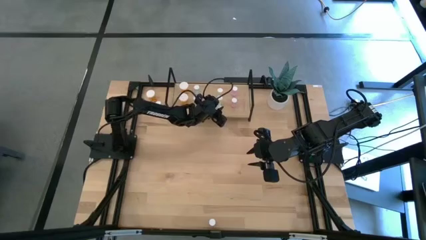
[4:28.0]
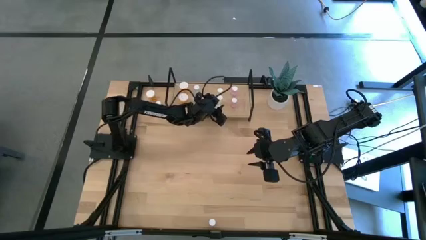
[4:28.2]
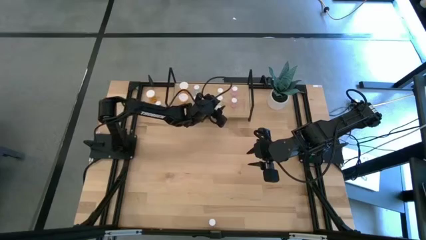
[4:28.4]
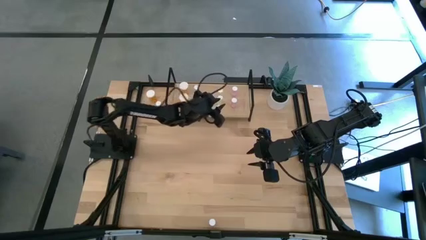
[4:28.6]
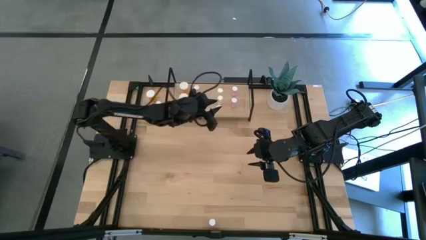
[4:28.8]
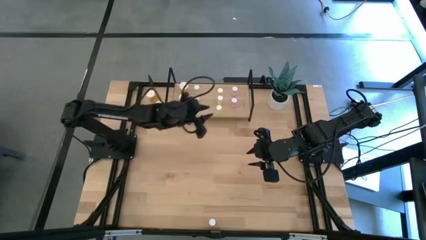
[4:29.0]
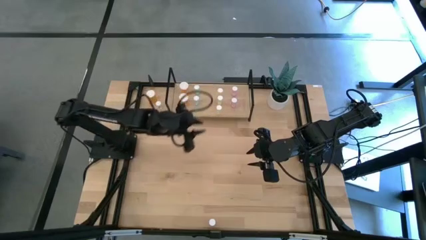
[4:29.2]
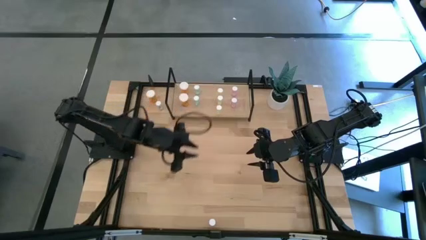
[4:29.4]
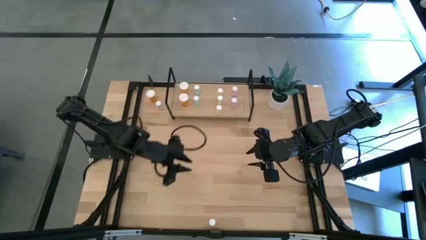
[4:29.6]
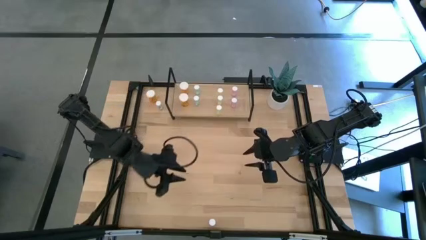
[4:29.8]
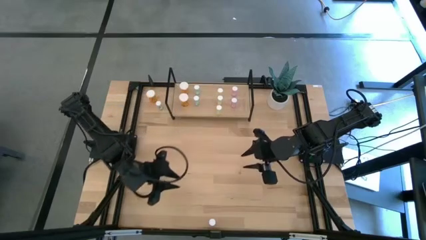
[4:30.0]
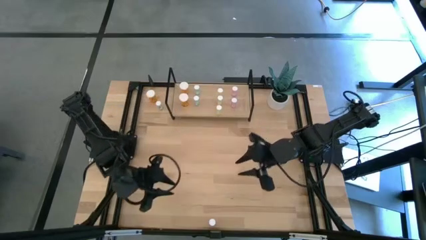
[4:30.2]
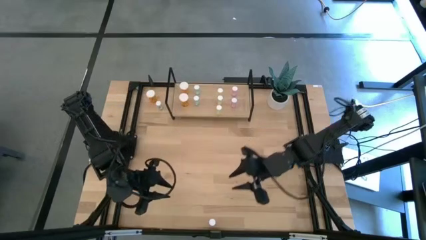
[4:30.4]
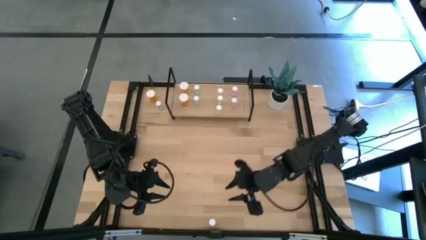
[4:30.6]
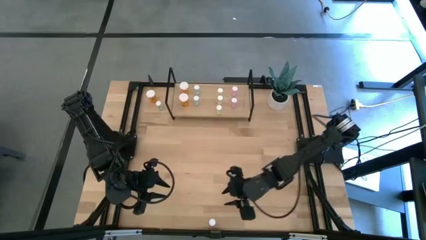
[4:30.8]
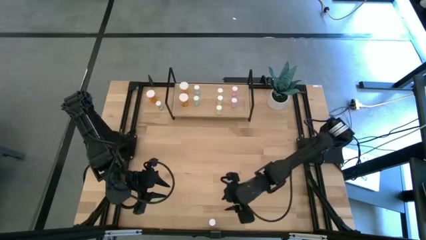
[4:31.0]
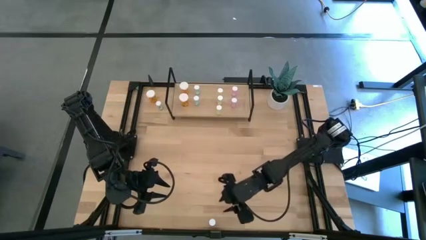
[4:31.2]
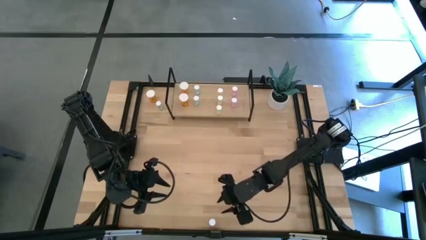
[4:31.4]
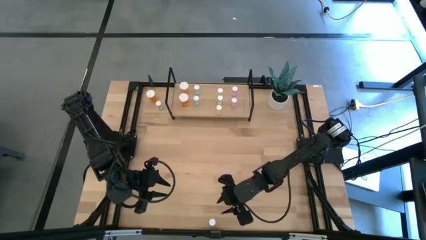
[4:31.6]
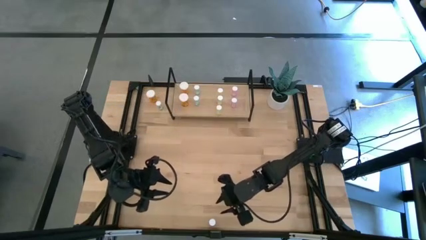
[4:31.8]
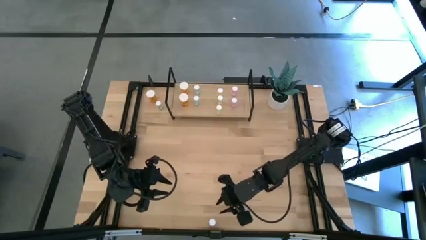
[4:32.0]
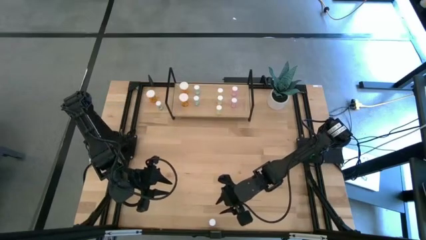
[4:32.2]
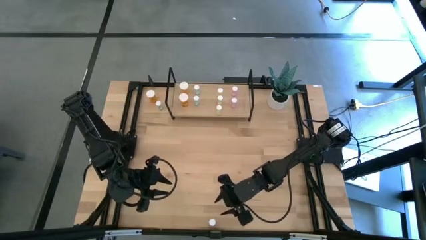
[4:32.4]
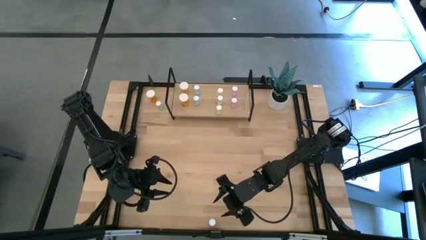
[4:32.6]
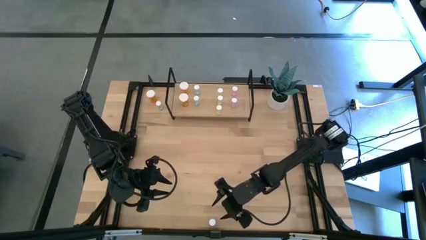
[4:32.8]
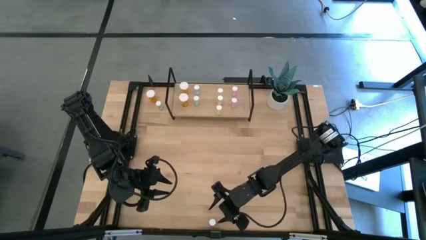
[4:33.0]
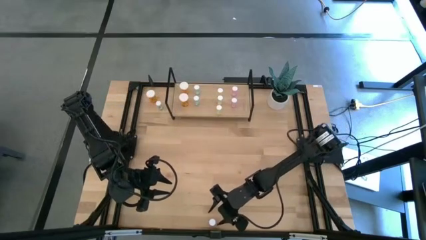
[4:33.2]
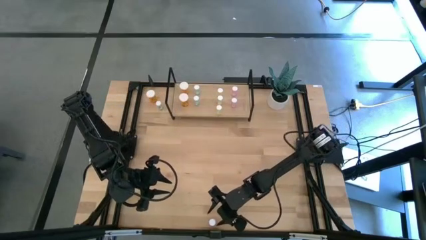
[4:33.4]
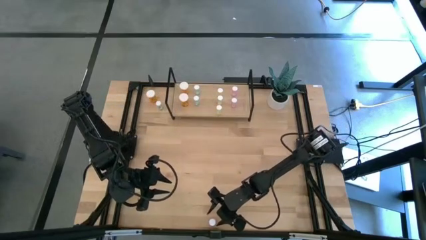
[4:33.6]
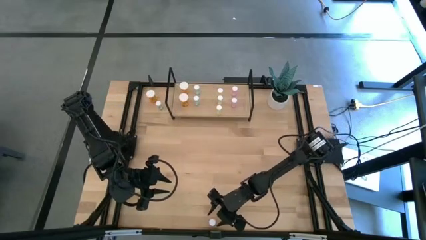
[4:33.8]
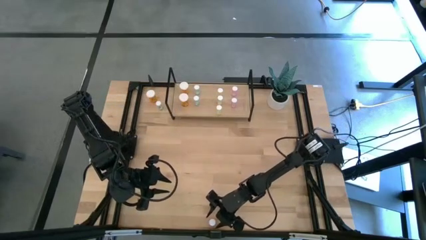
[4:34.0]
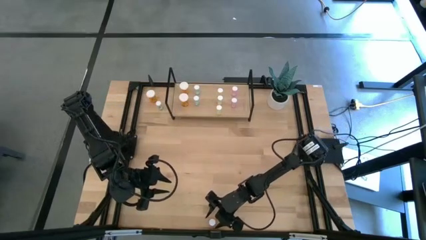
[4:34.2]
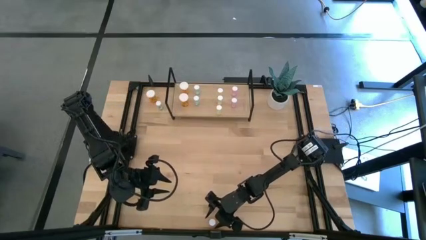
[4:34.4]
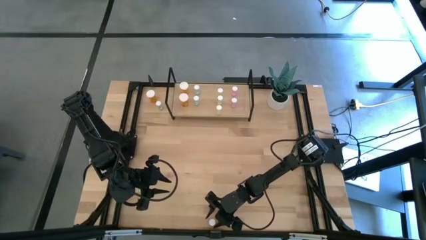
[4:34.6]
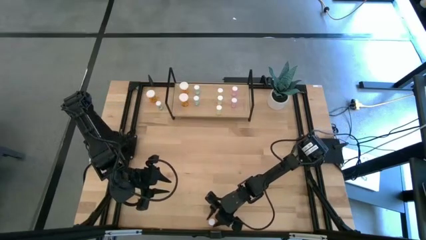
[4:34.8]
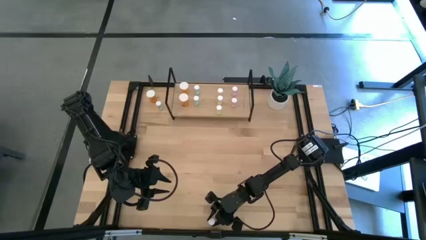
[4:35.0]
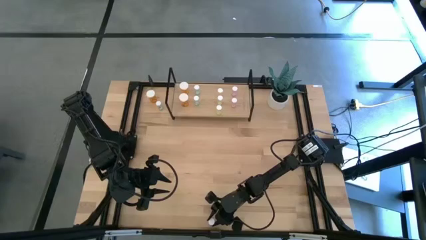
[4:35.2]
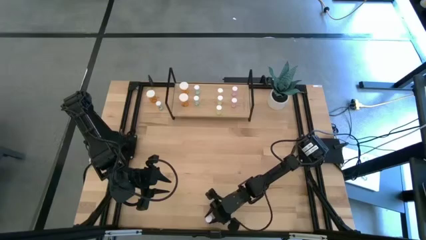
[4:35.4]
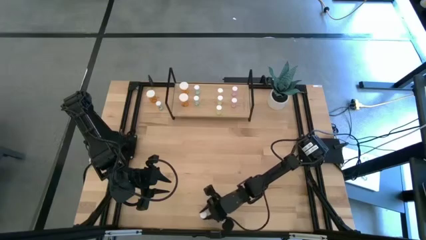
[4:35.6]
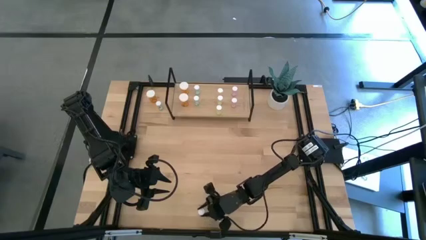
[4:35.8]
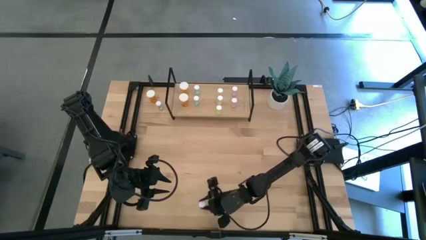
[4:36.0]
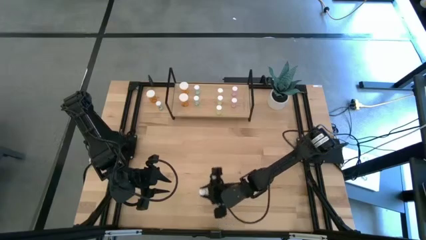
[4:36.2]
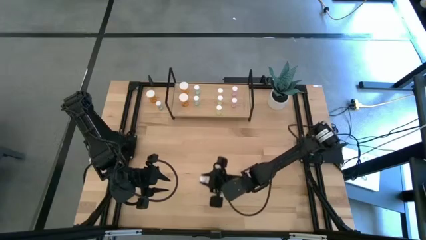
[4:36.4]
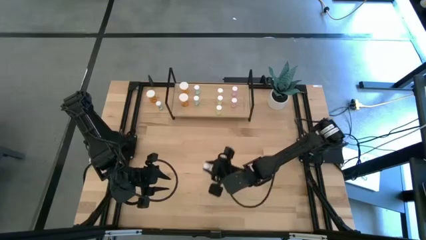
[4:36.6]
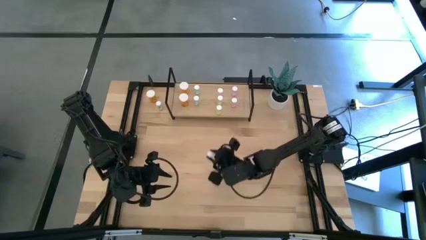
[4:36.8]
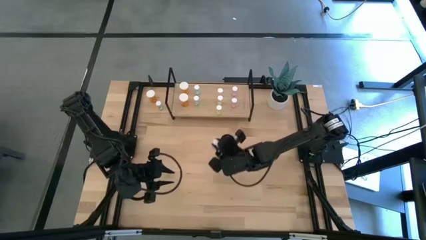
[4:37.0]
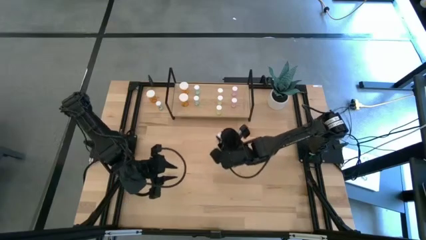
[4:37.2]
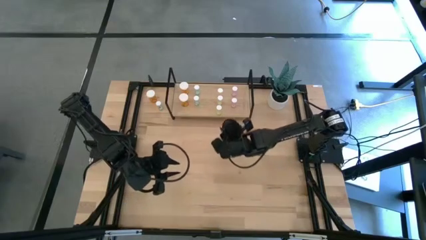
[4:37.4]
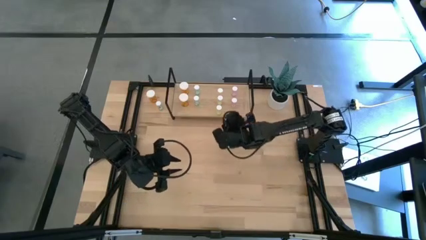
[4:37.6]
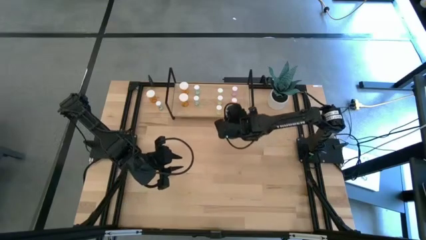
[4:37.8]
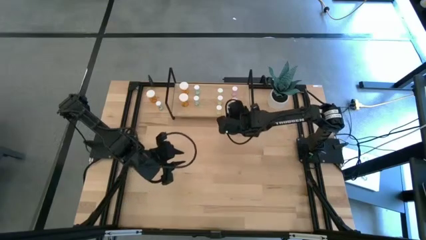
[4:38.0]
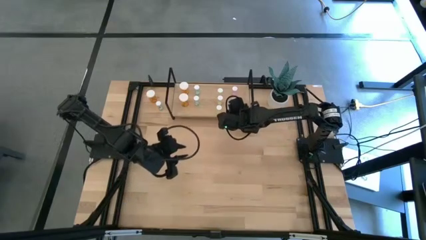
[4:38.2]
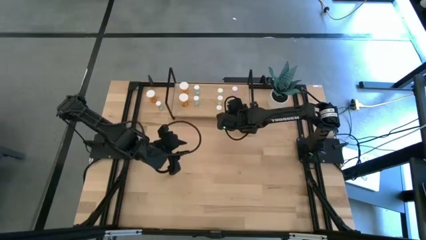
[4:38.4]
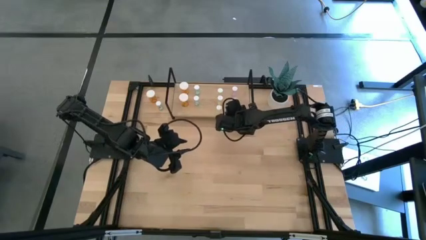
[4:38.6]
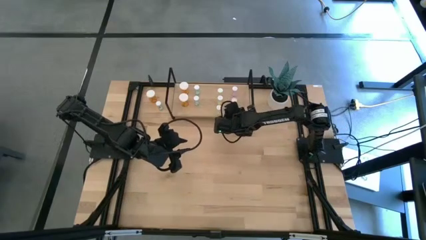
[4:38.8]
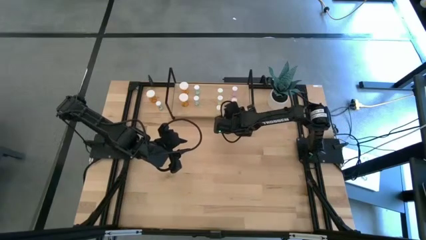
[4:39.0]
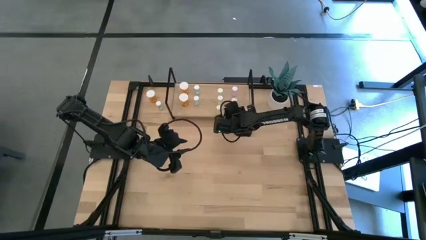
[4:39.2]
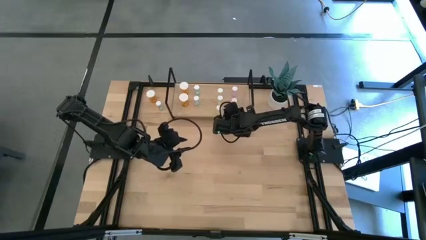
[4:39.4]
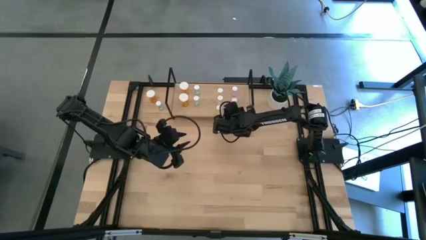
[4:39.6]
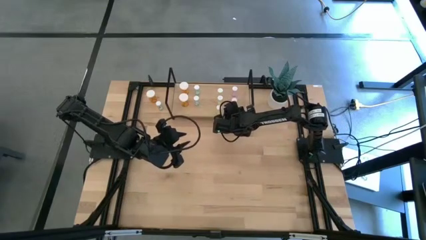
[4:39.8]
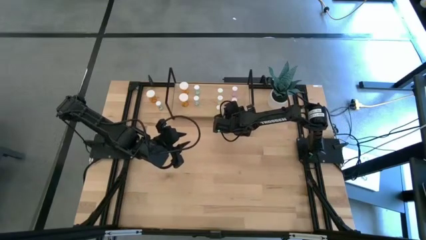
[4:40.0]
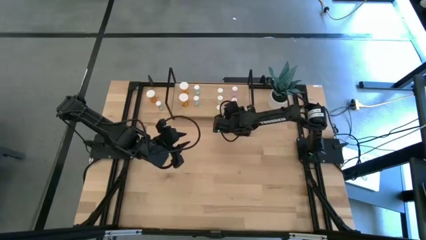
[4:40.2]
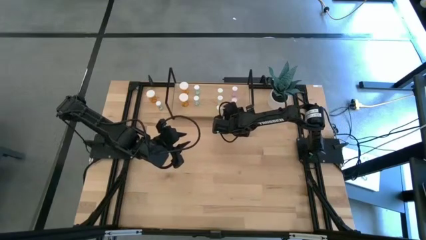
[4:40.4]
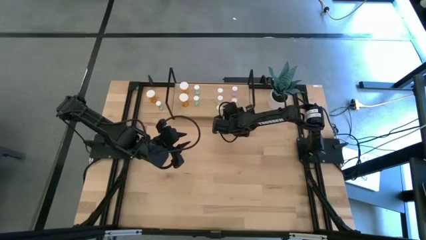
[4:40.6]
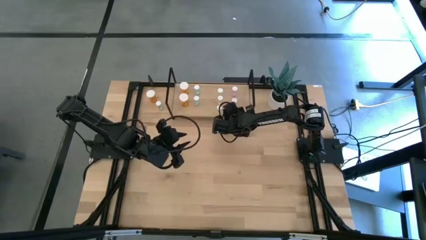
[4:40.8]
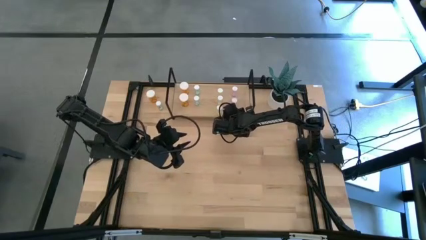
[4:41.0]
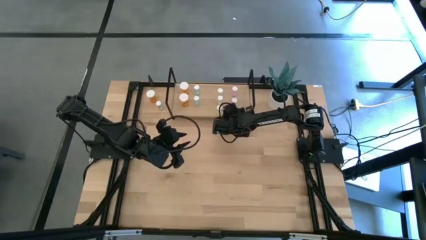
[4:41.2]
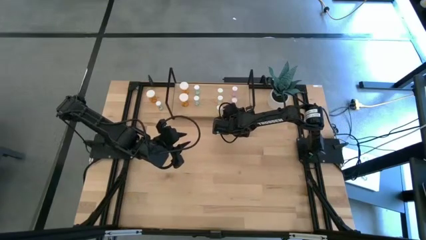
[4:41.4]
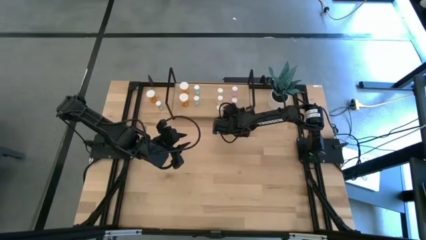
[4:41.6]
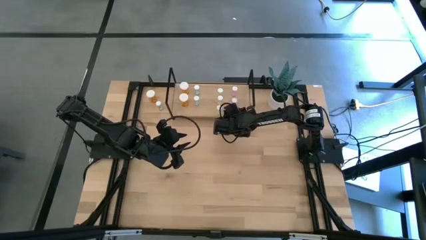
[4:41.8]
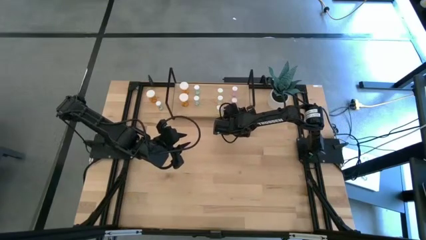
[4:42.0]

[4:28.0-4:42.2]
Task: Pick and place medicine bottles onto shelf by color
Put the pink pill bottle on the shelf aligned with the other pink pill bottles
